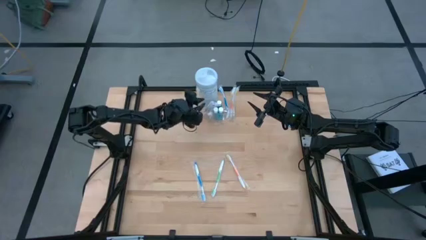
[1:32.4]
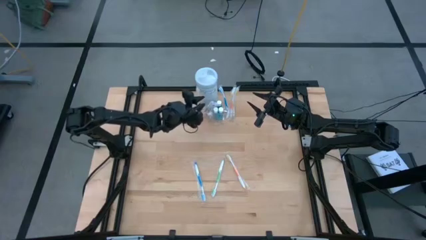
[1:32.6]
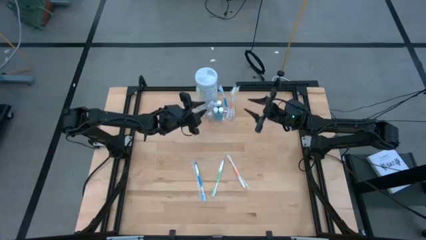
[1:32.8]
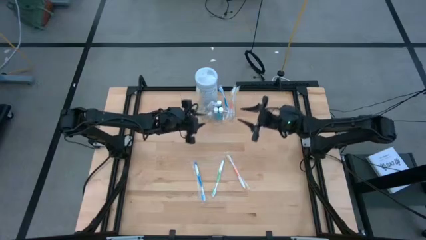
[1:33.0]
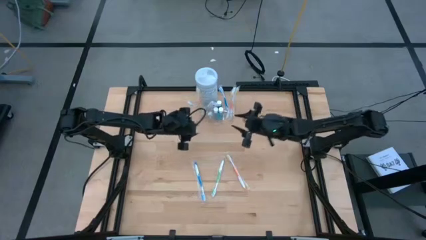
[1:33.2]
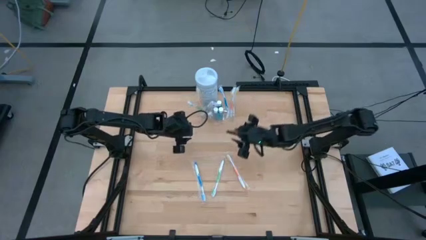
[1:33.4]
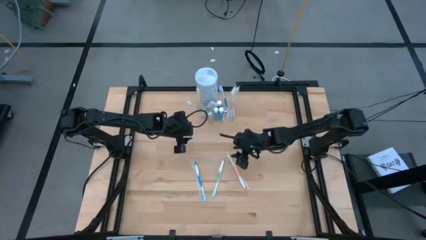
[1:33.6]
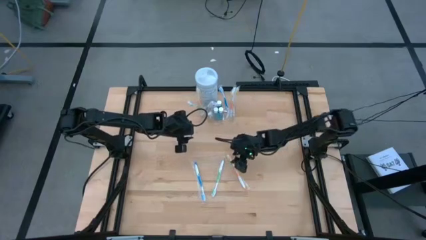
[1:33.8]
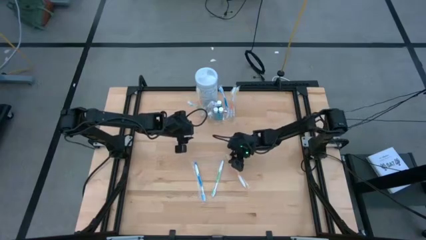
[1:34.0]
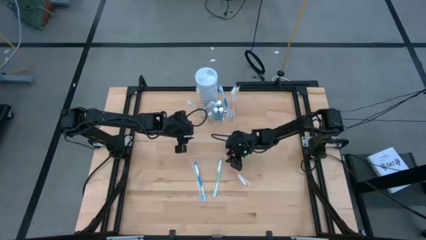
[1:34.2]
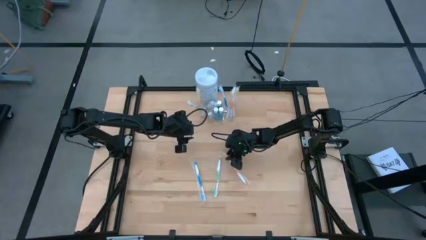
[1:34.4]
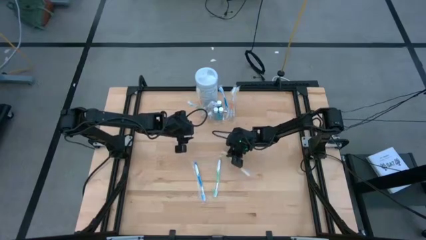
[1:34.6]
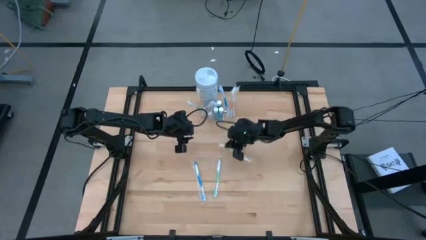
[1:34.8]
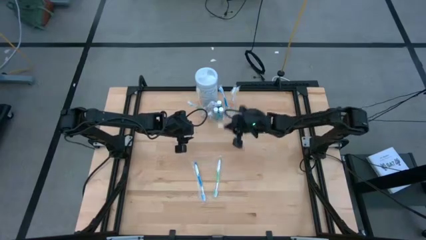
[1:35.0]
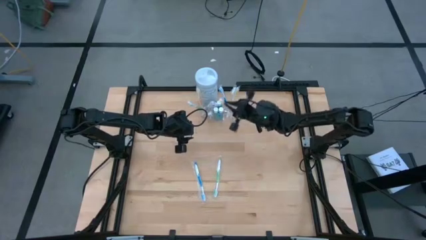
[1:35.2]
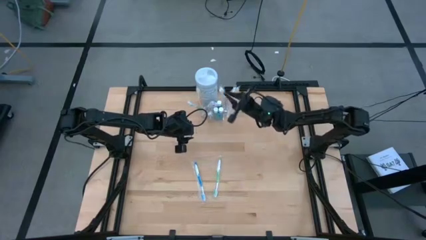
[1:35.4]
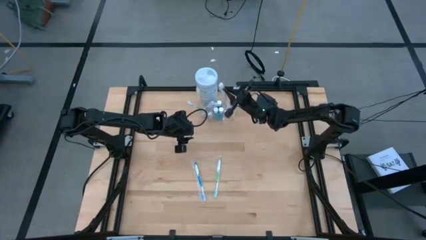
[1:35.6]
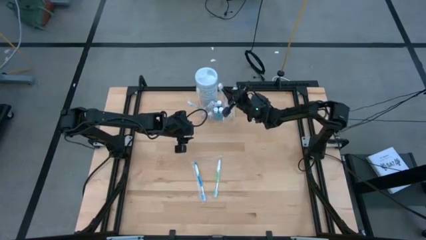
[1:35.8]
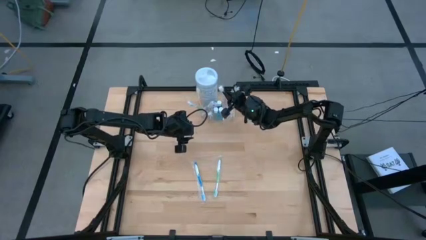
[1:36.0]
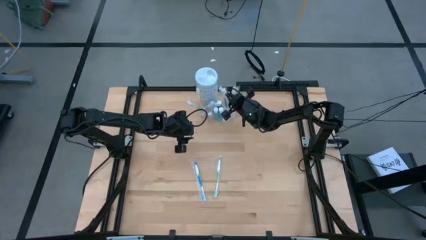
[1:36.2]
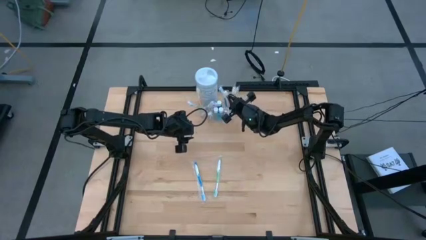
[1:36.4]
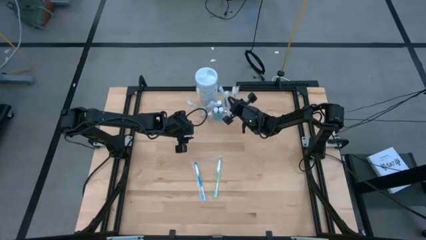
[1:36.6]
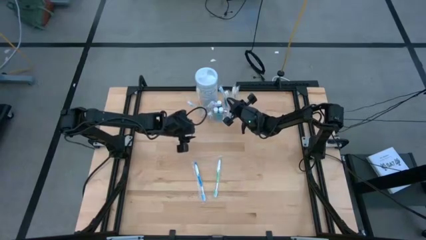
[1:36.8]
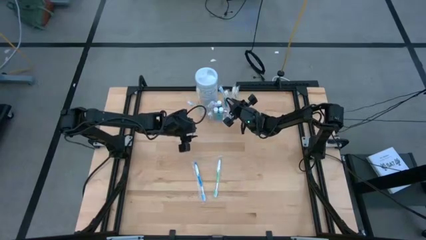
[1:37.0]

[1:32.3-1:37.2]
Task: Pick & Place toothbrushing station
Put the orange toothbrush into the transparent organizer

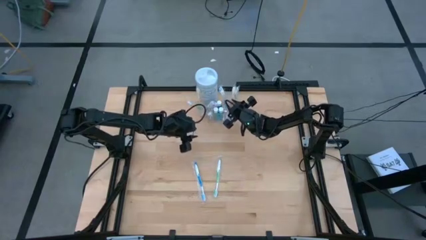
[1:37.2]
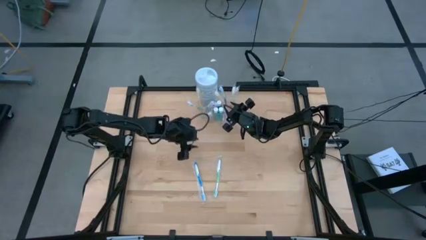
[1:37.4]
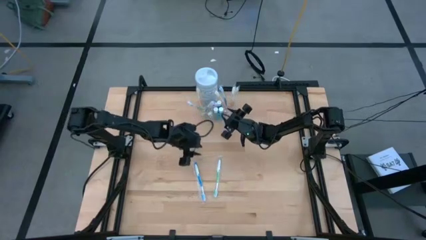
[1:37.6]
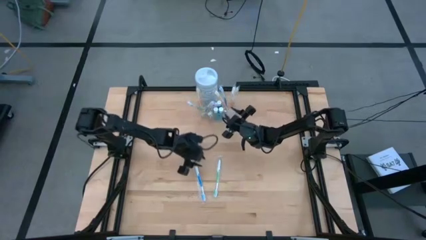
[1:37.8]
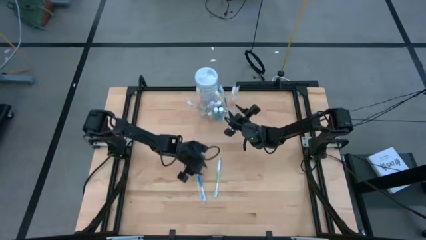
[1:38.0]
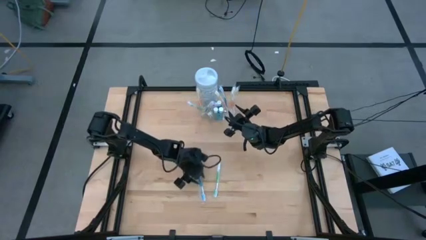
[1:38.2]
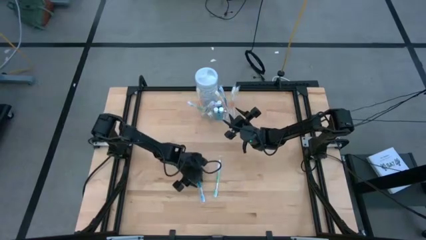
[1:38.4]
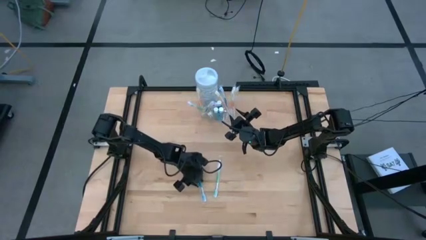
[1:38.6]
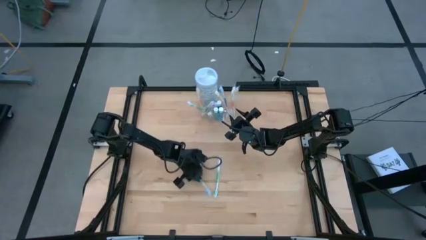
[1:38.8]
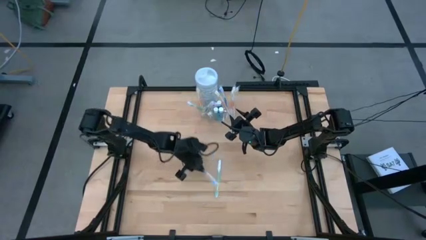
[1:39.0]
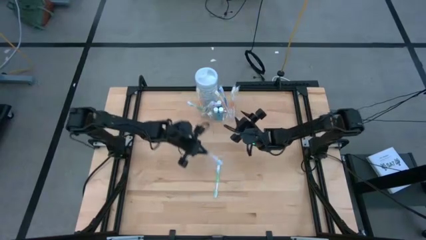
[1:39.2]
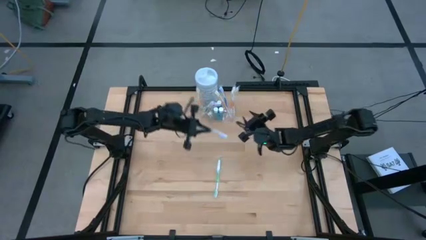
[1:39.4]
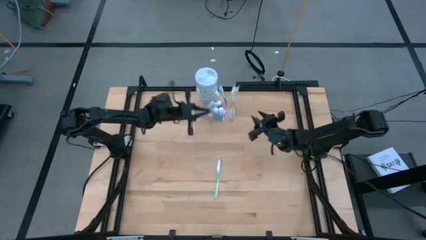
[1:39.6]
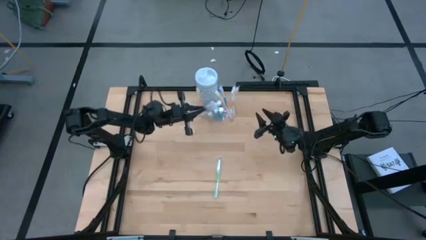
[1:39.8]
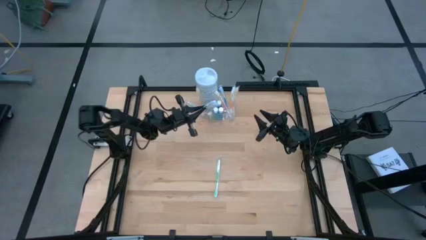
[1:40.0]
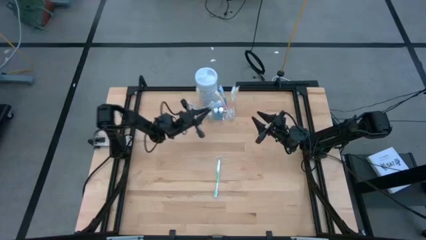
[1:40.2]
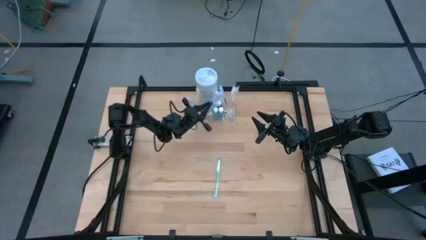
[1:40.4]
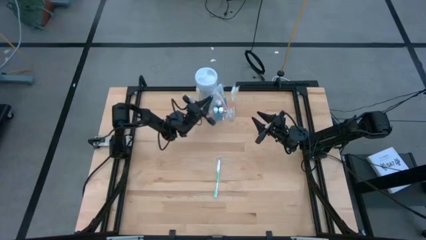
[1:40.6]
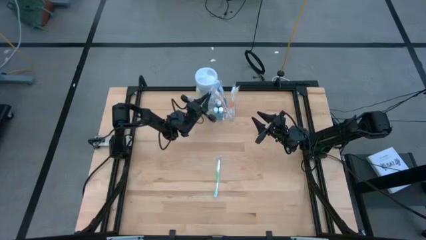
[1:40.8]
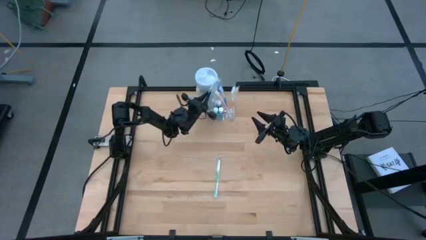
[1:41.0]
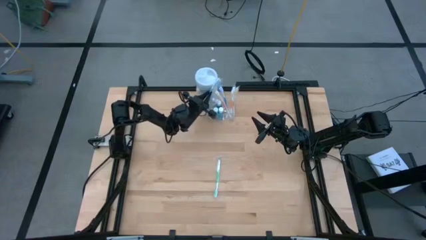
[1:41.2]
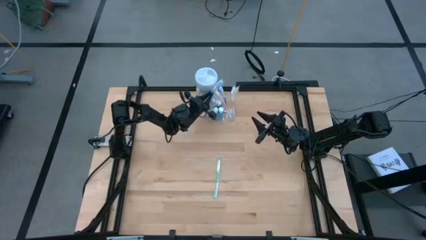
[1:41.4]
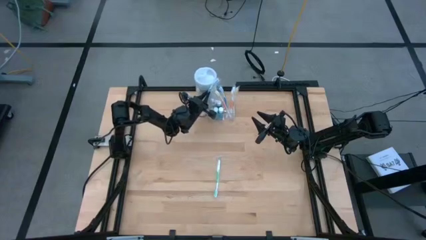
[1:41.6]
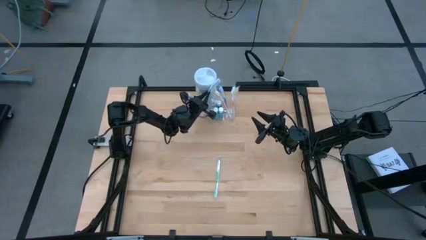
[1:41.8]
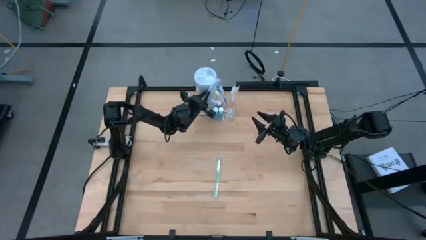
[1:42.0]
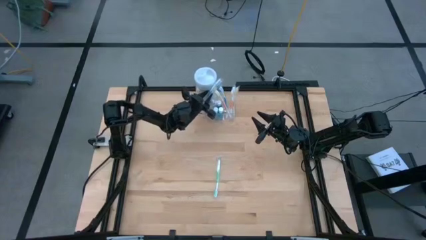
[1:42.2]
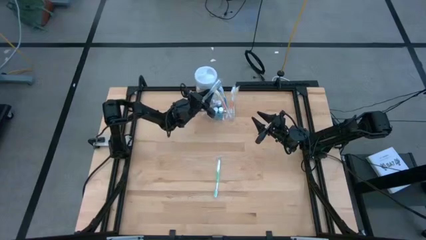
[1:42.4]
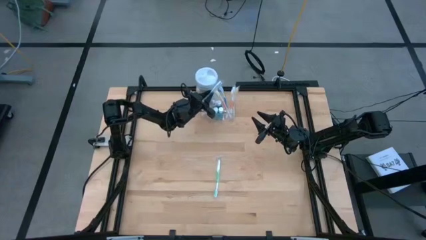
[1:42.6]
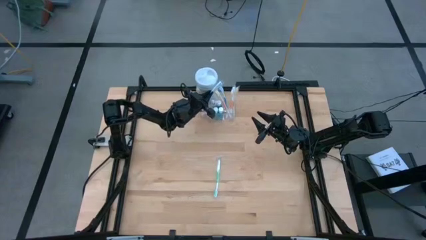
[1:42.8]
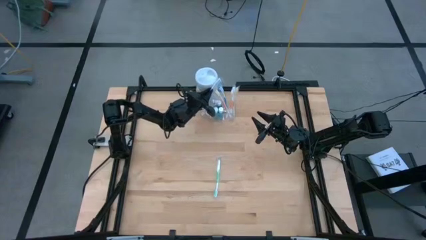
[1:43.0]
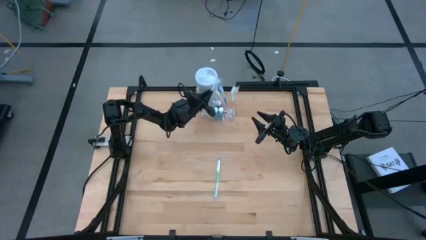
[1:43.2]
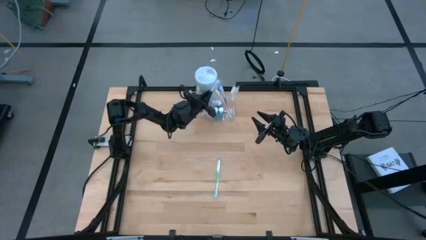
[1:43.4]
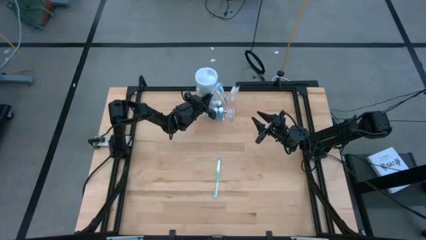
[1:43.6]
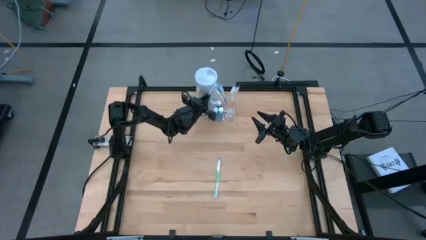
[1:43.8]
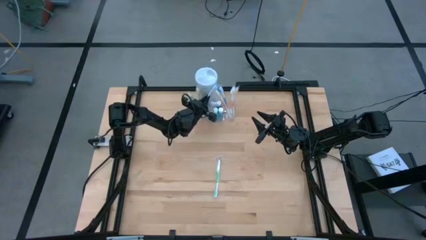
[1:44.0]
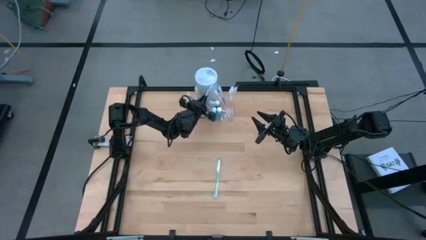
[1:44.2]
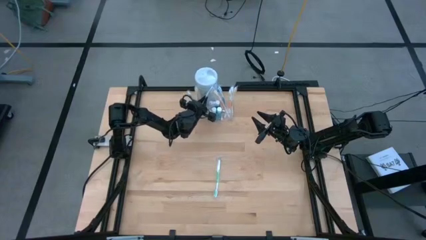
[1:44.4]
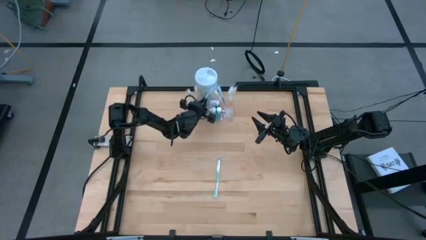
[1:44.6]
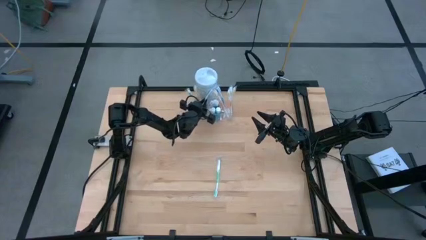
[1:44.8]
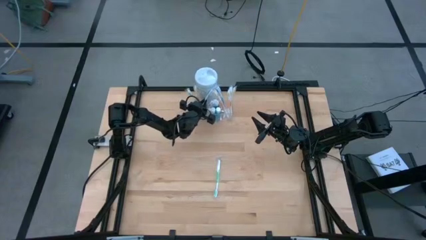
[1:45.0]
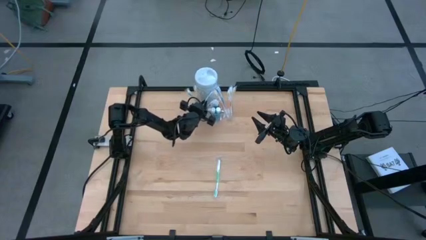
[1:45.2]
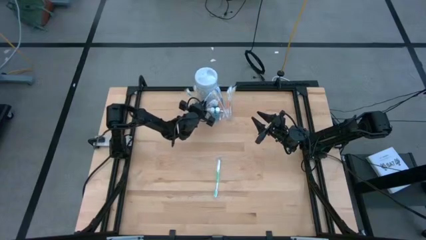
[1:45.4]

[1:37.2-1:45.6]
Put the blue toothbrush into the transparent organizer

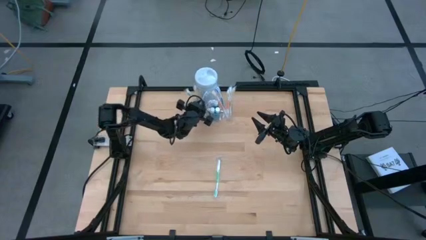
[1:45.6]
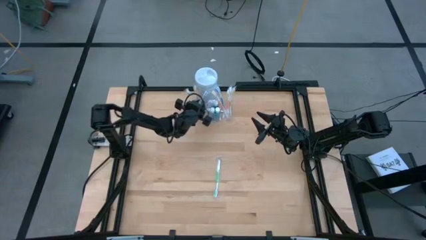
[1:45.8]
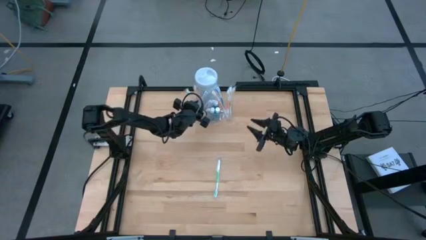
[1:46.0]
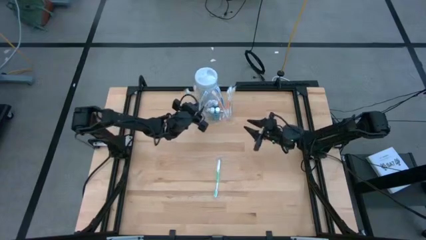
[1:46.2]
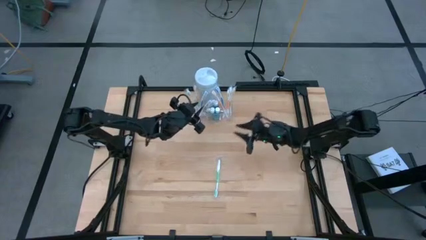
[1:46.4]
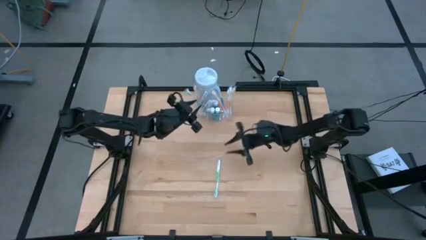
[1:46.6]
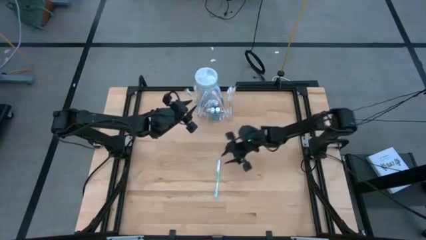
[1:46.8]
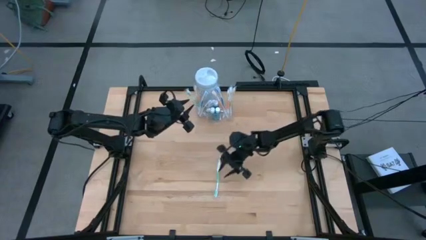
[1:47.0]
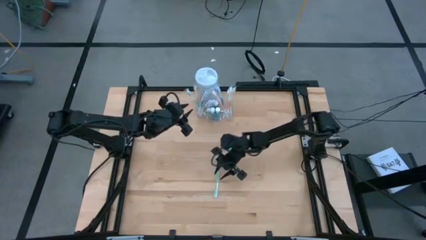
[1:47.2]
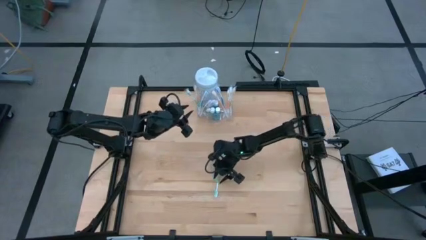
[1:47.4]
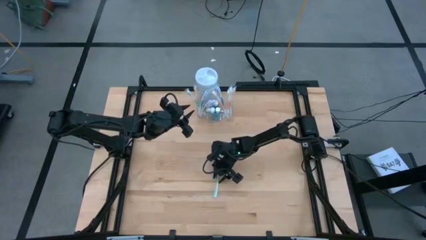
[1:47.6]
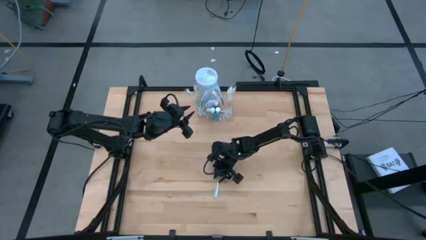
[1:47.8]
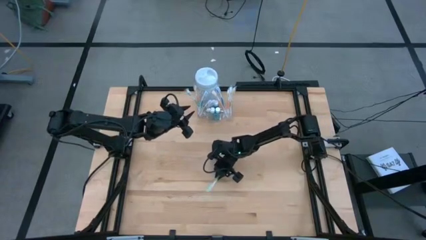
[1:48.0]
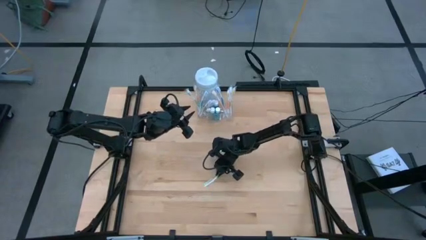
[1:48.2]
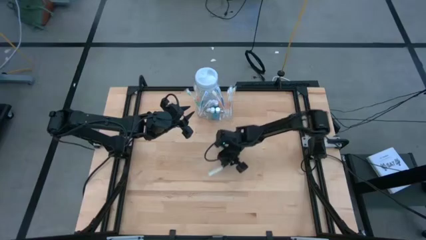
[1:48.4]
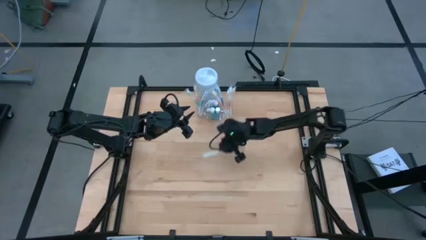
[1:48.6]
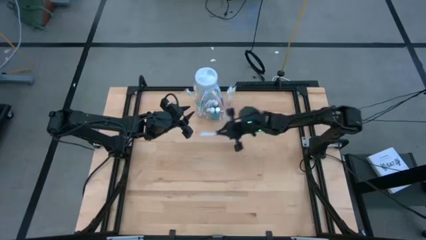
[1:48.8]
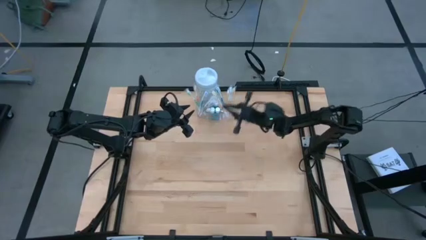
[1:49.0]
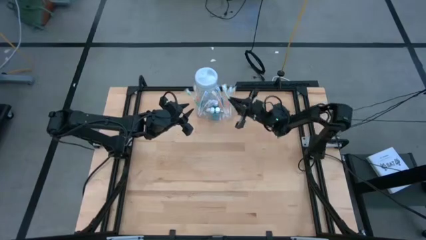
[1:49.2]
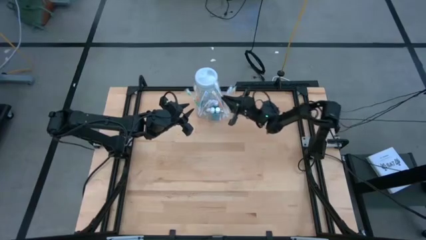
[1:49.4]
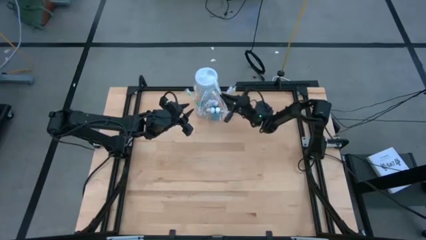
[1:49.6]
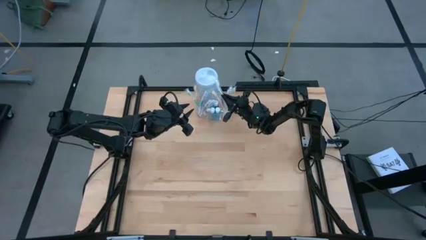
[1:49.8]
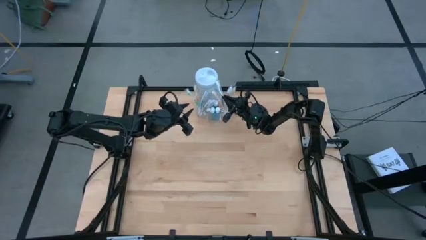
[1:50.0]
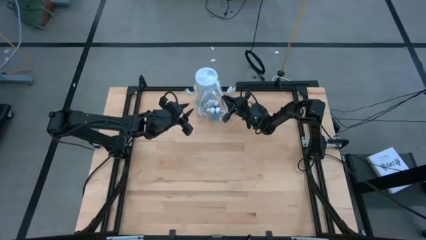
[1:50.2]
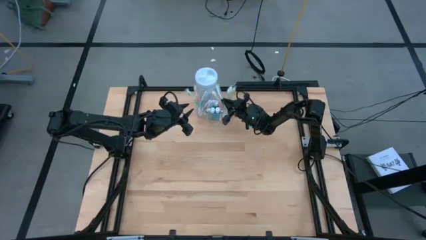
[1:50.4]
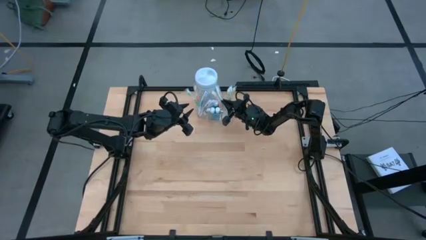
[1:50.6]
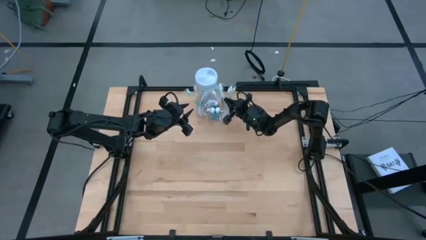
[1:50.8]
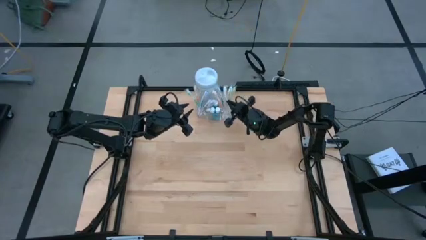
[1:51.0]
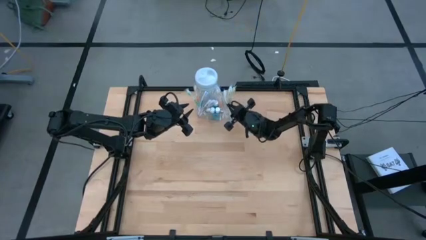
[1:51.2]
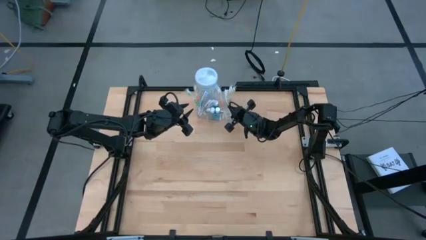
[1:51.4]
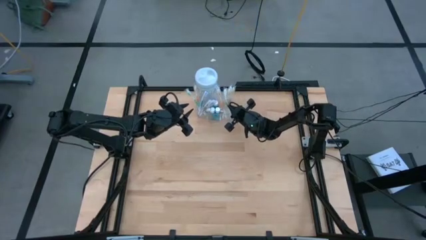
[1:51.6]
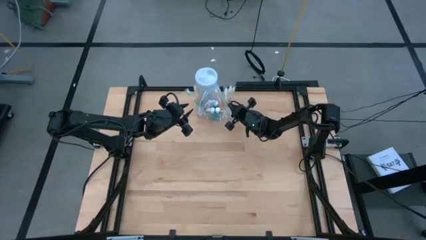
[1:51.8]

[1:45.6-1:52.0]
Put the green toothbrush into the transparent organizer
